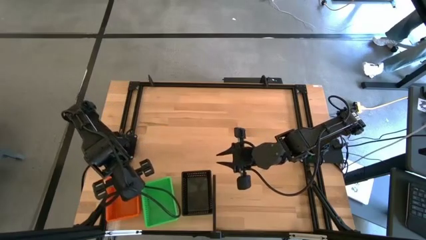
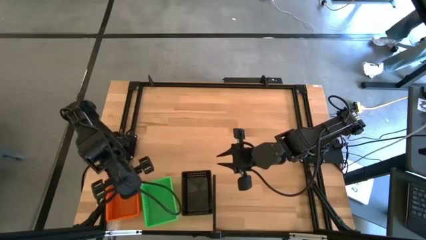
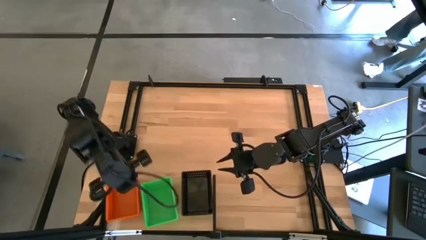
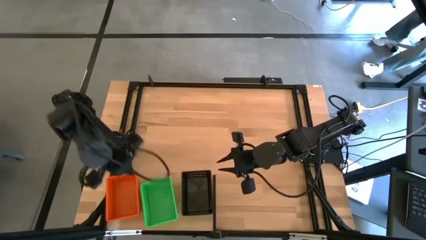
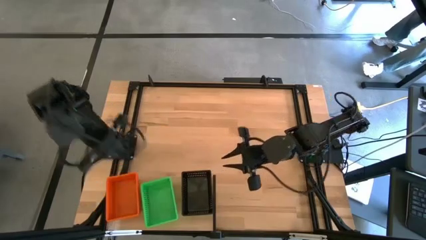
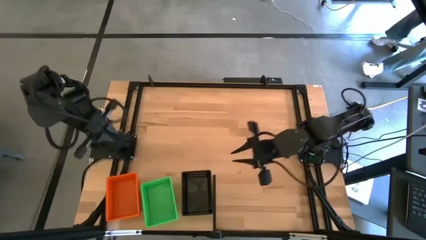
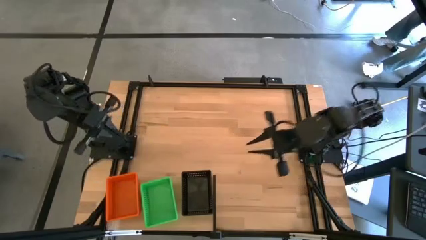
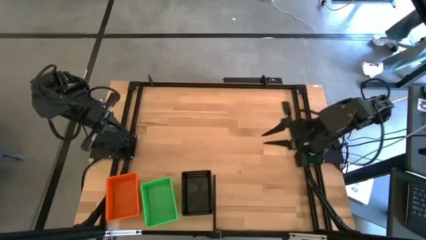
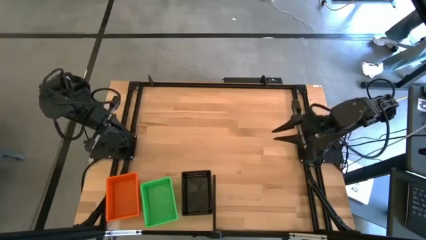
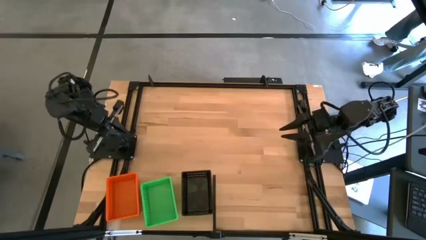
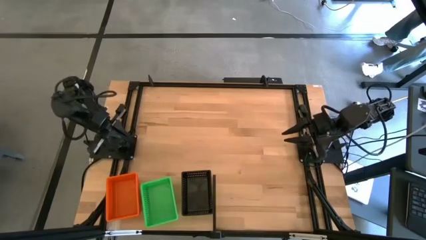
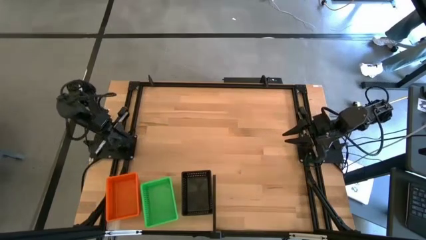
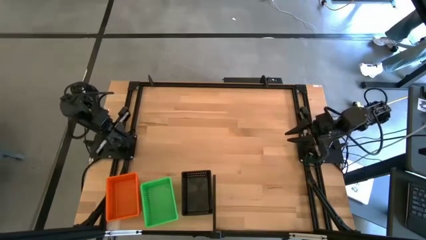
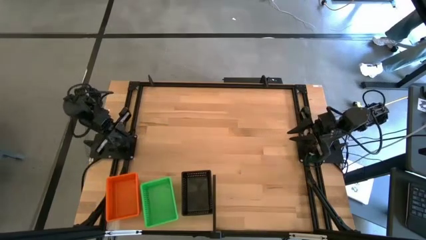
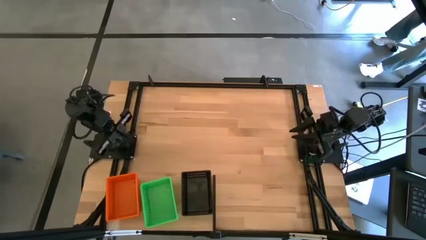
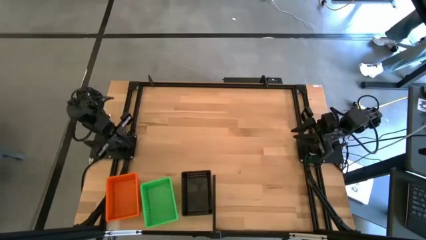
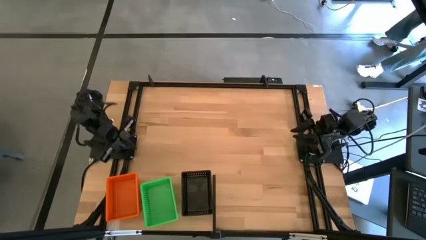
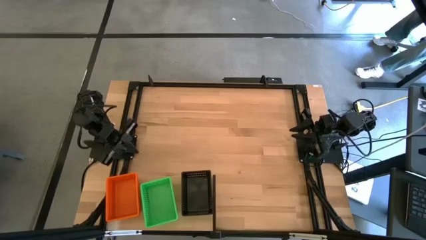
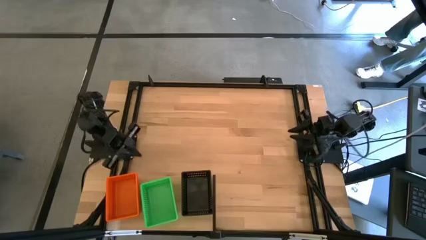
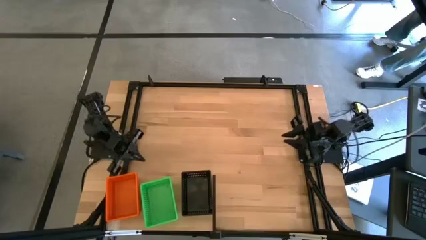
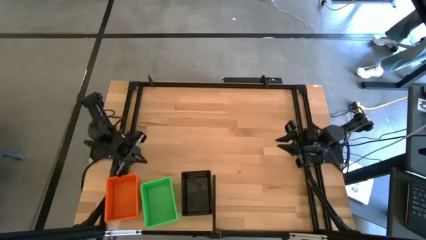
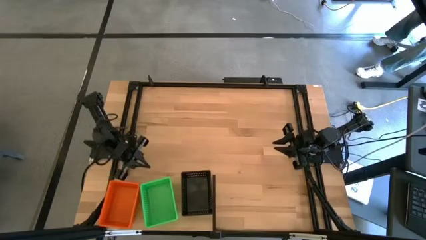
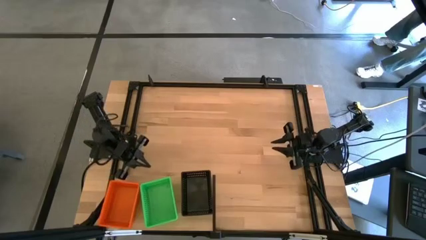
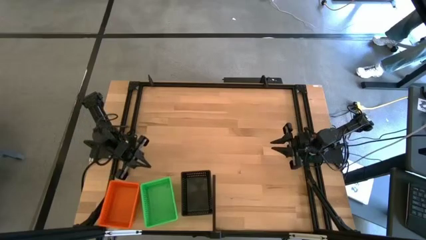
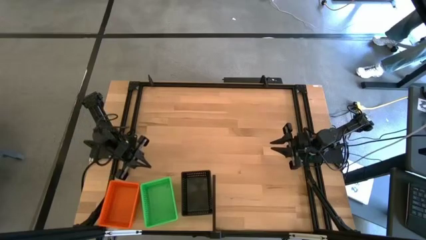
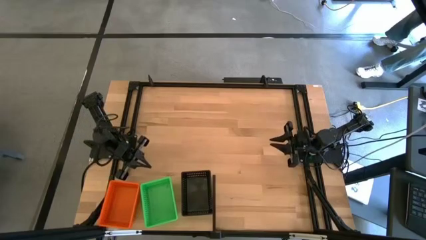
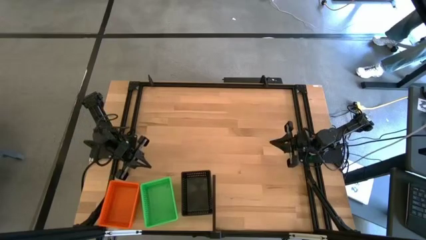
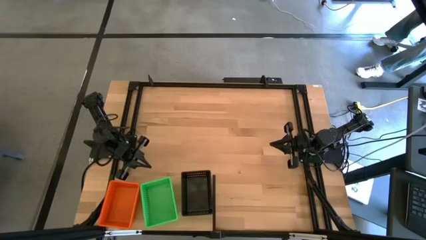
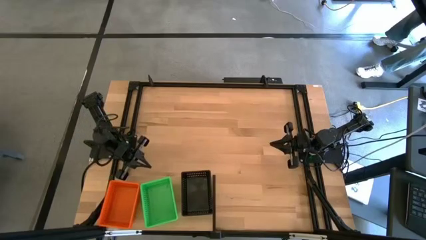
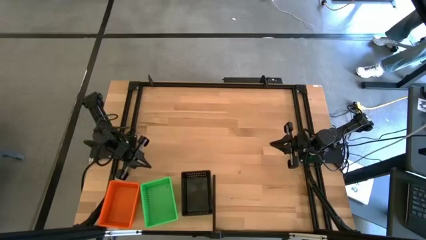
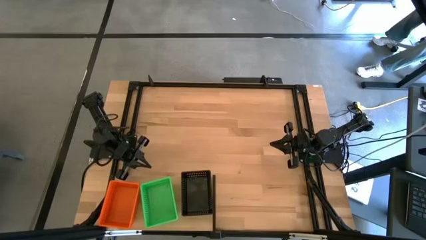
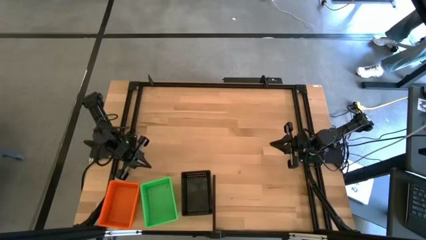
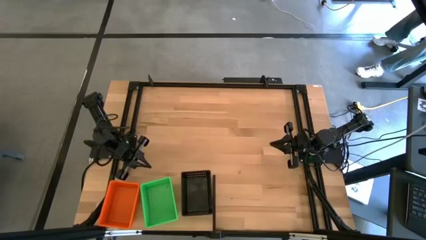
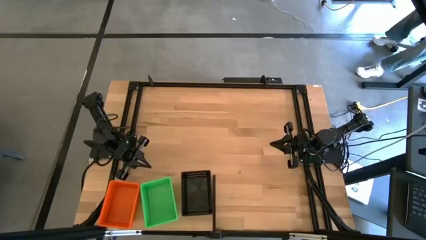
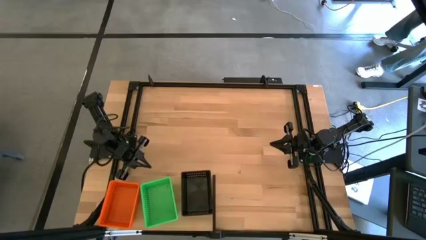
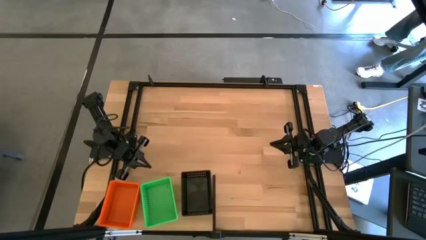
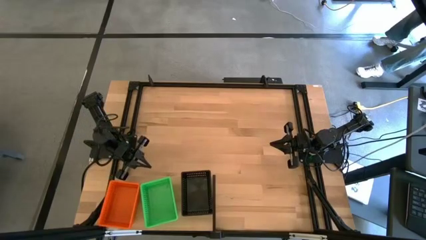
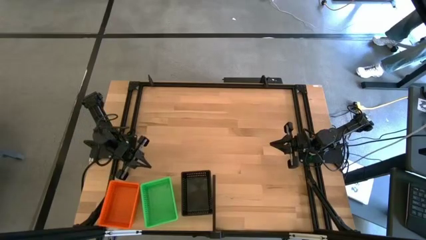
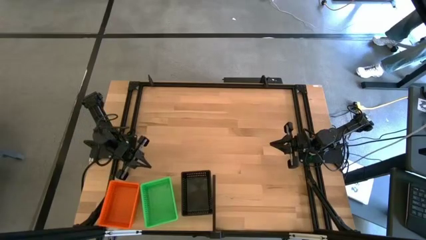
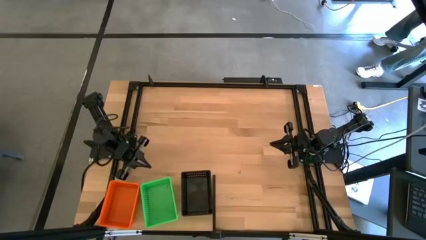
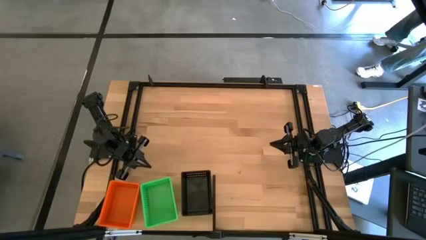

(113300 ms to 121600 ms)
Task: Stack baskets on shelf by color
Return to home Position

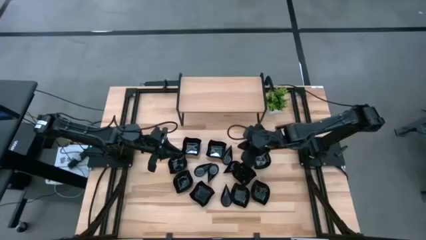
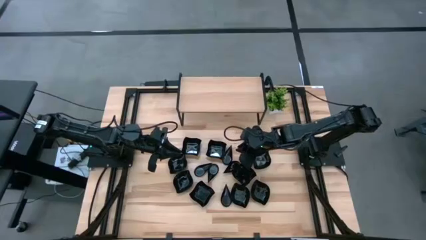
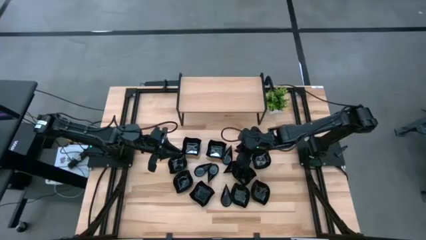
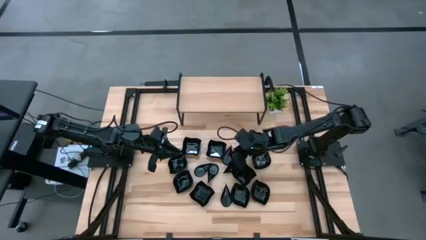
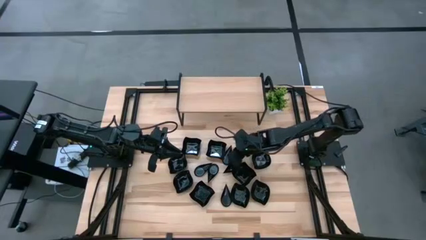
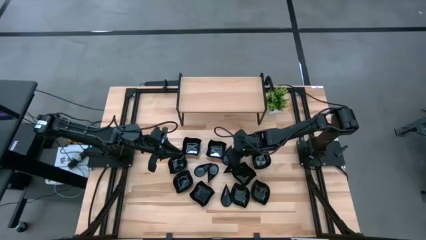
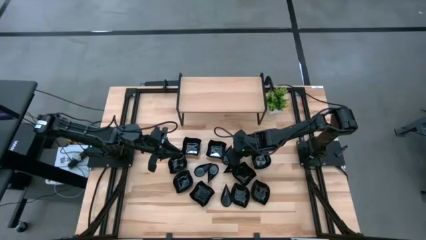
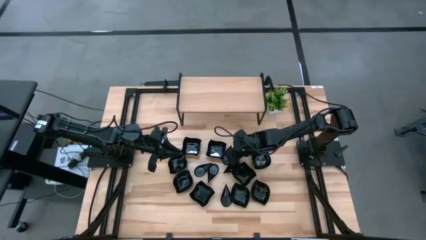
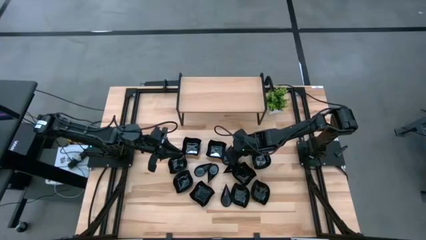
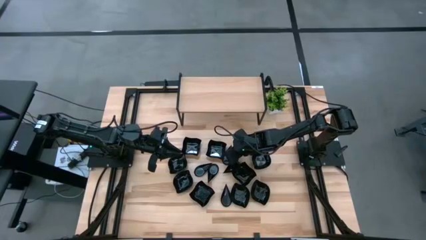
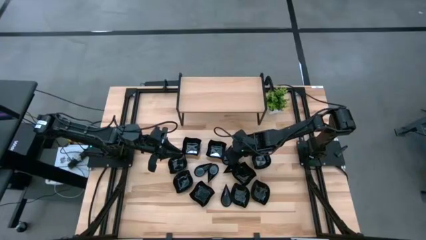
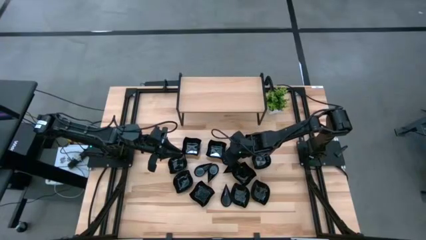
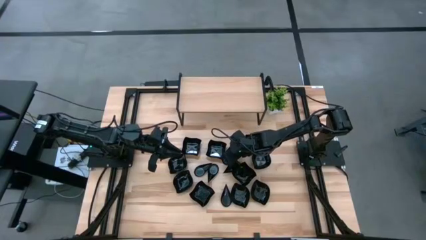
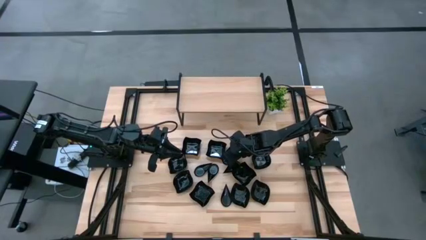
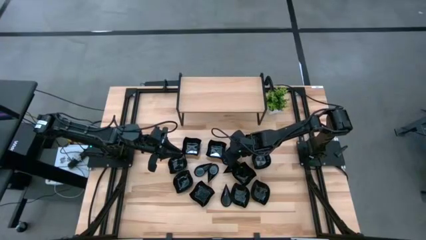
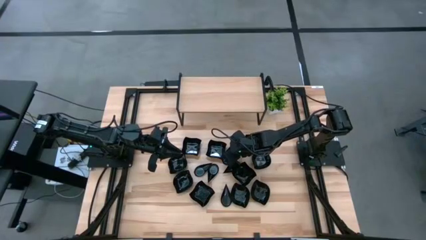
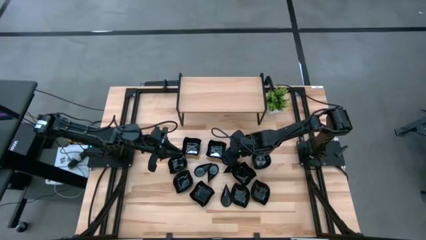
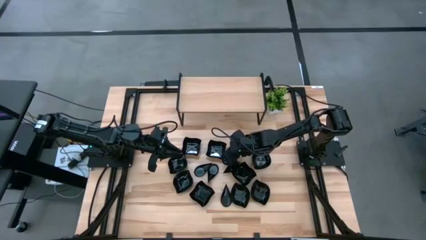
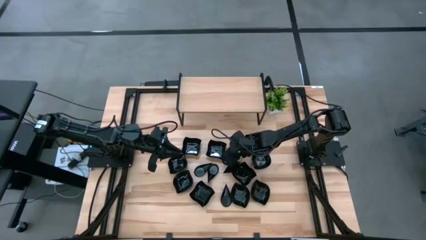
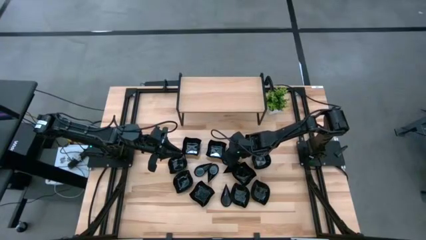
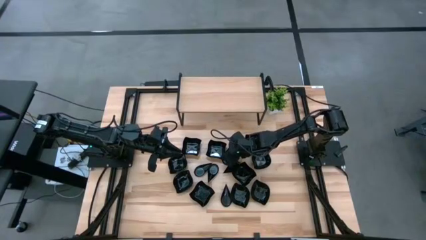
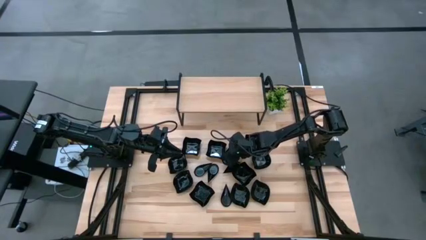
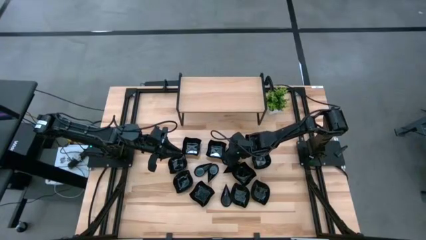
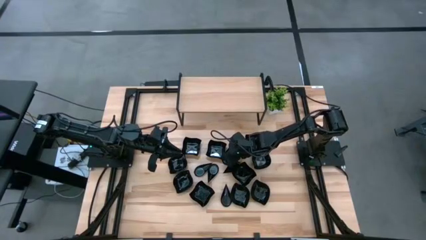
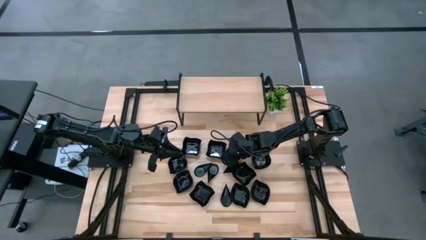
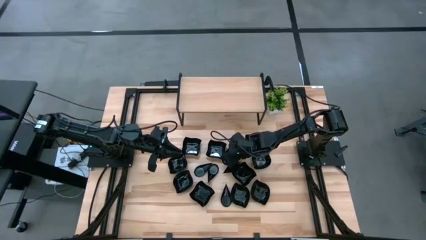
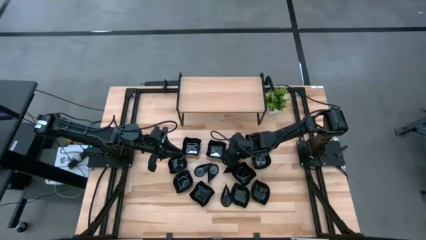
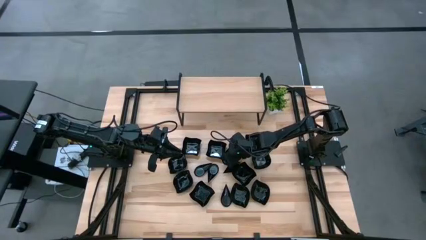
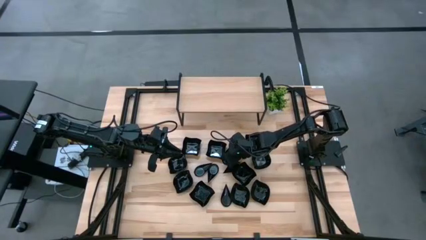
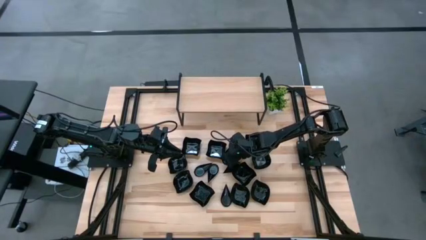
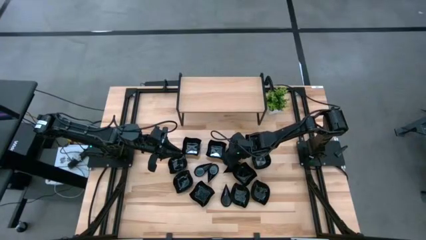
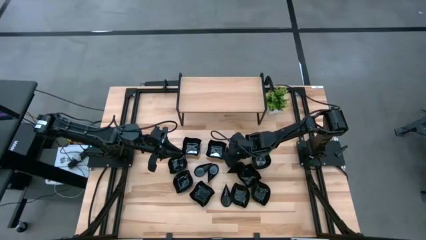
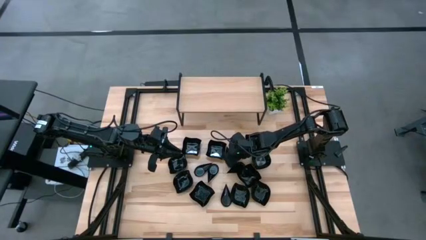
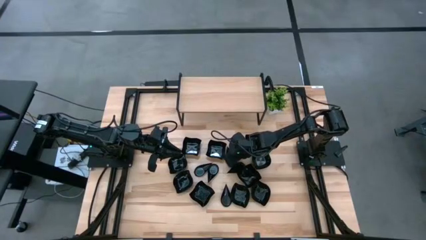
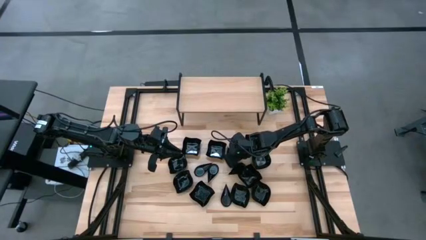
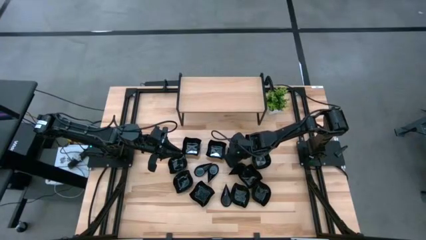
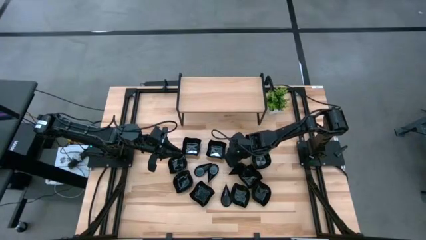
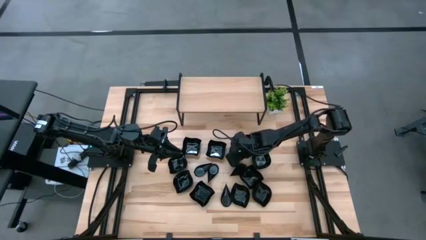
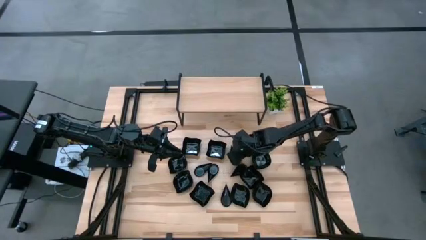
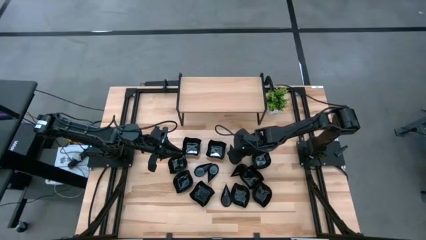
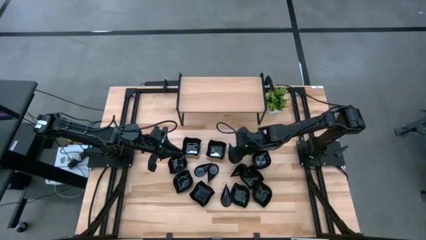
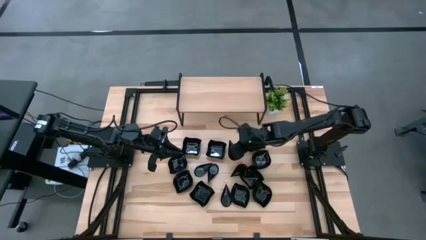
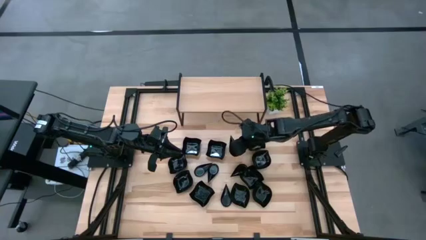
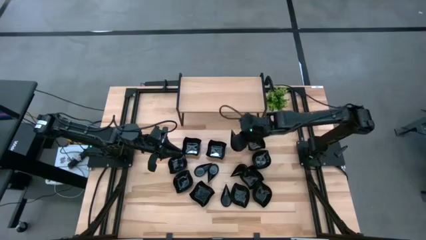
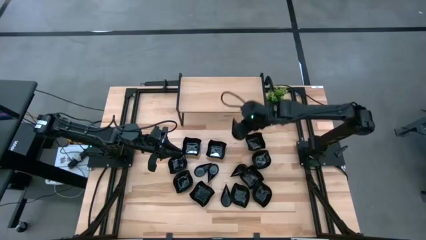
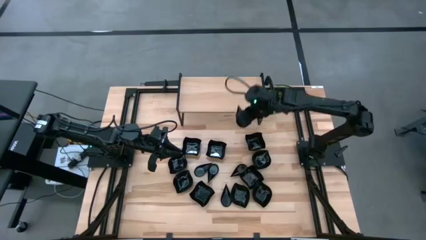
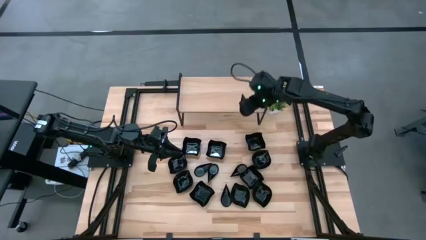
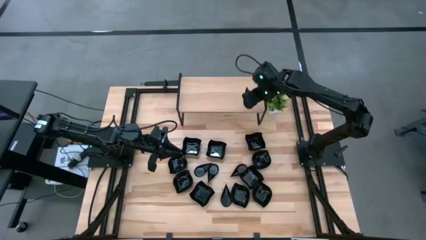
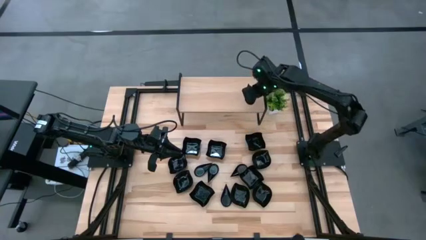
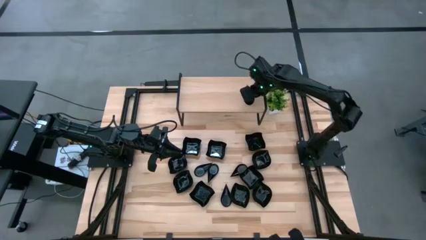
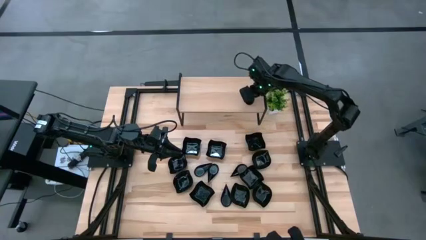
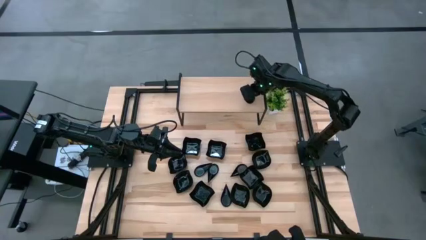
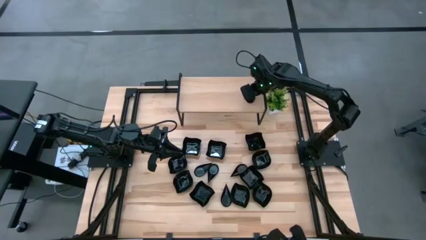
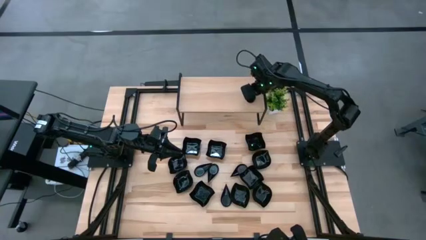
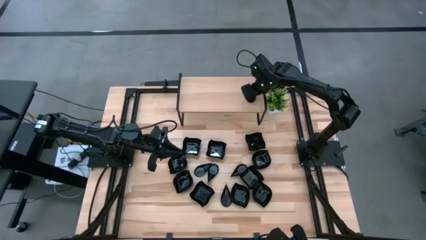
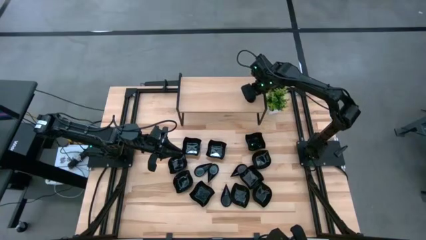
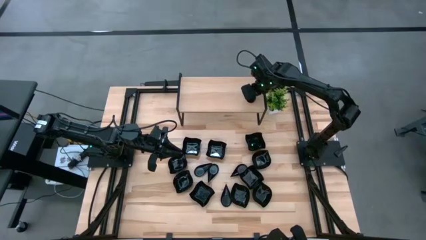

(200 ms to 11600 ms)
Task: Pick & Place Mini shaped plates
Put the black drop shaped plate on the shelf
